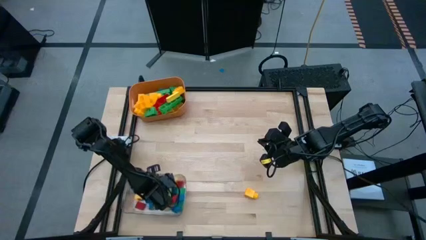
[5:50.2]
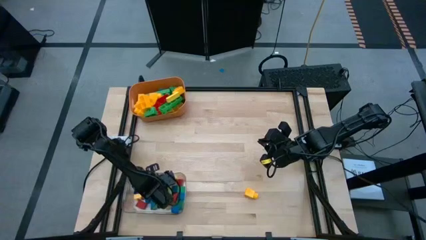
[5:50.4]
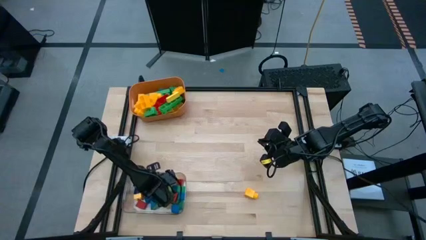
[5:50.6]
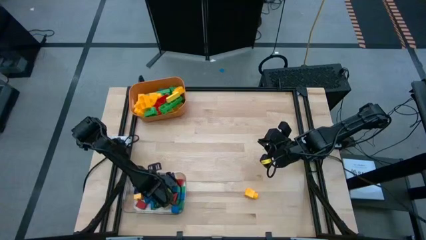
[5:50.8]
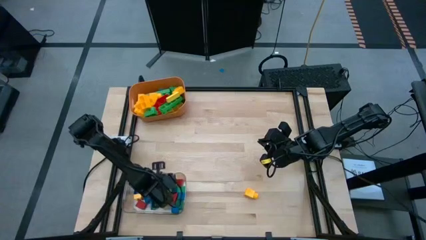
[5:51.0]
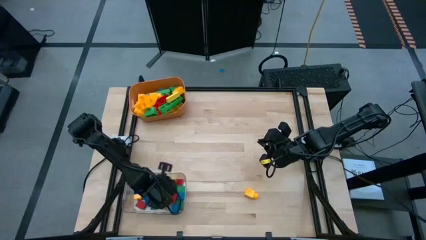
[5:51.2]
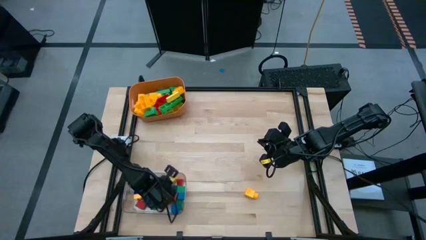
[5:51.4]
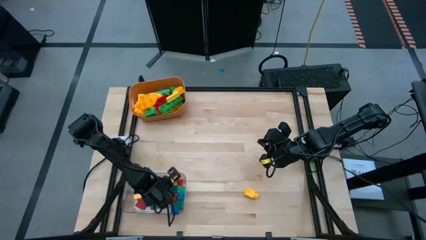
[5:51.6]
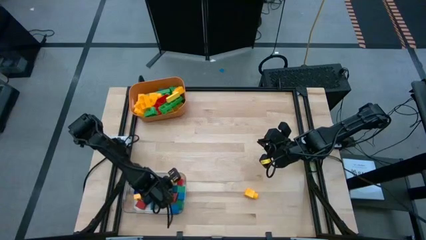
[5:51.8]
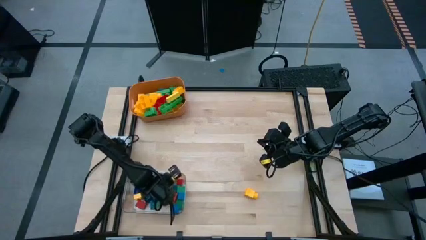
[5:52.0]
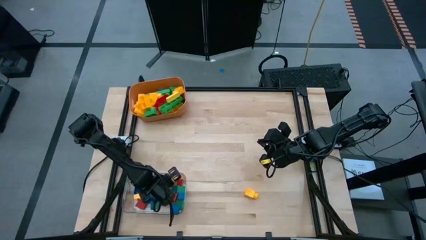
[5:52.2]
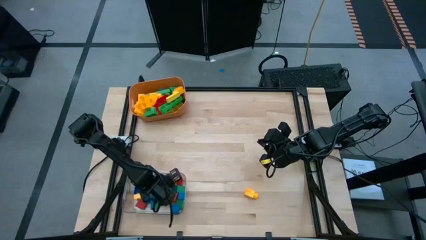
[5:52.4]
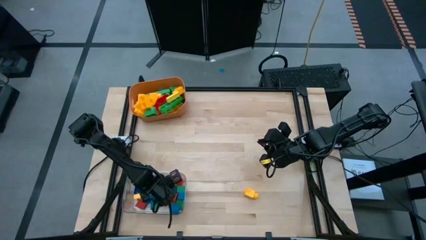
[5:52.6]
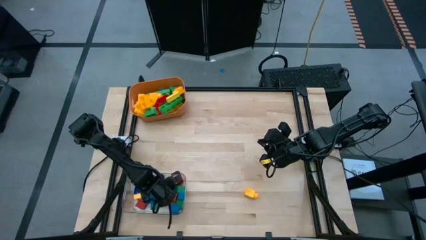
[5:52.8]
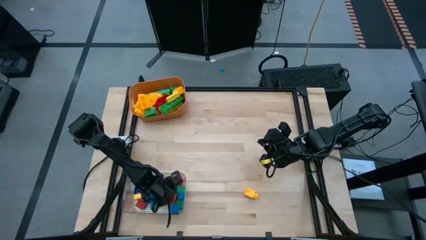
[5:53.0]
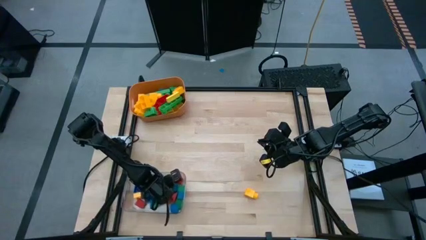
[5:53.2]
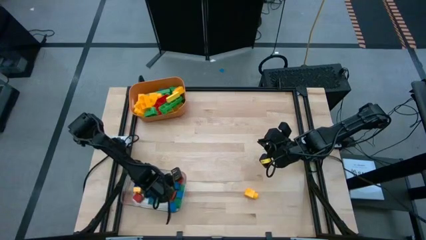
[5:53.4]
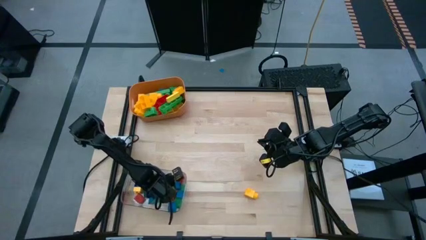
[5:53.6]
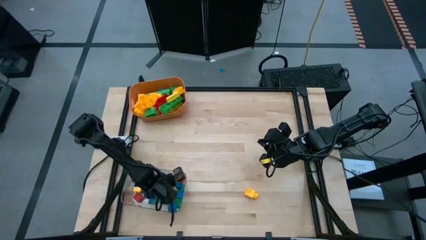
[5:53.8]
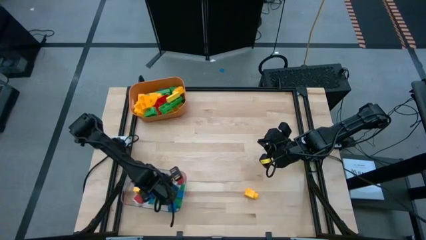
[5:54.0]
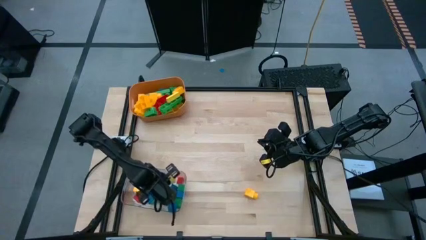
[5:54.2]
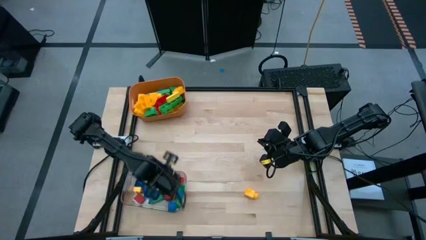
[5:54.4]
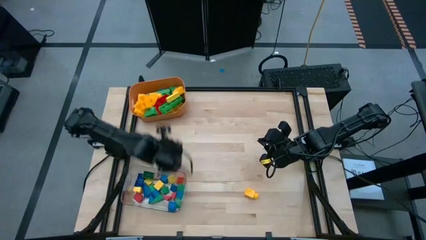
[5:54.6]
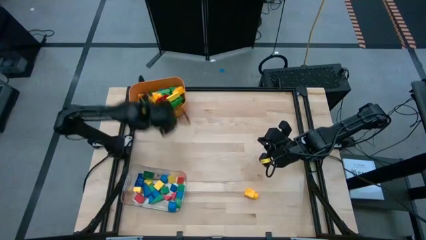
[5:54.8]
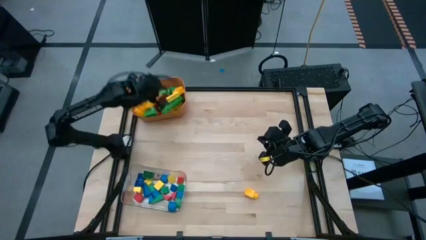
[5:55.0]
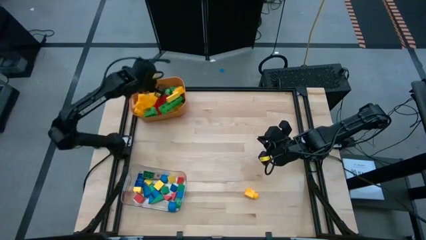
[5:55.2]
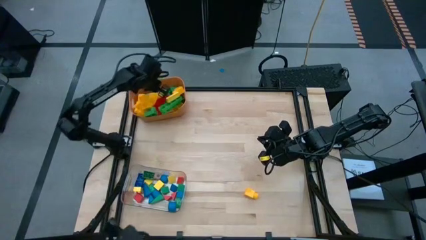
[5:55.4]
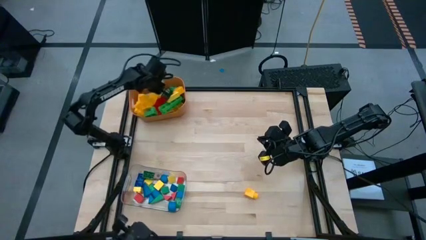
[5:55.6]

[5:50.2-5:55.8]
Task: Sort blocks by size
Put the big light green block into the orange bin

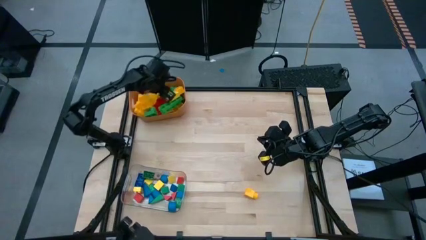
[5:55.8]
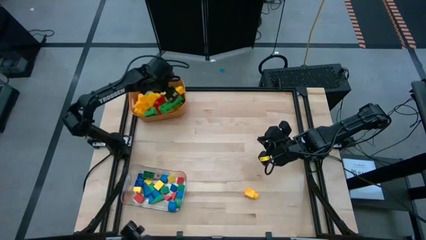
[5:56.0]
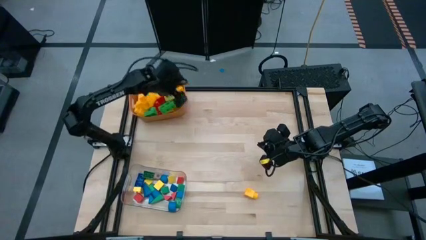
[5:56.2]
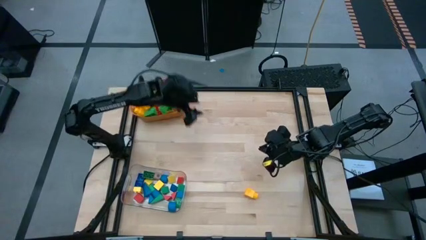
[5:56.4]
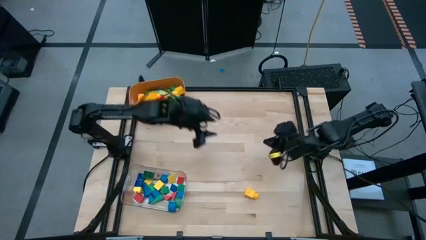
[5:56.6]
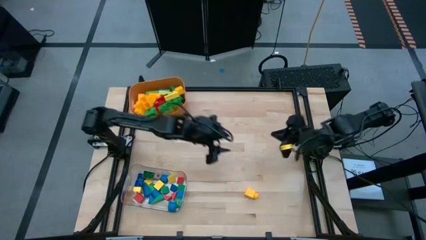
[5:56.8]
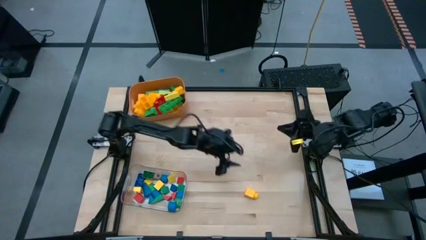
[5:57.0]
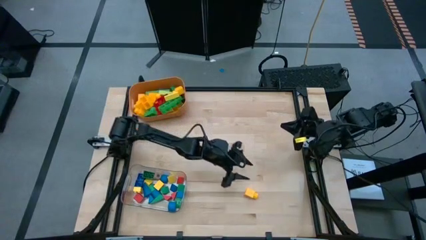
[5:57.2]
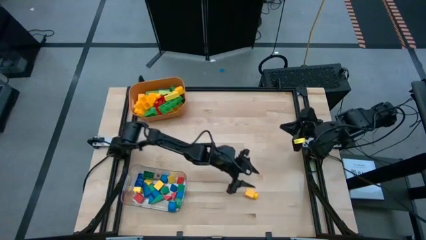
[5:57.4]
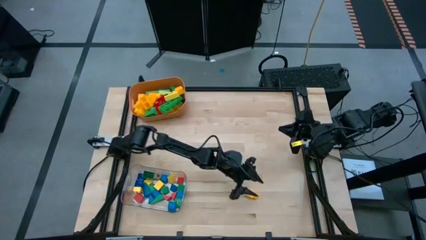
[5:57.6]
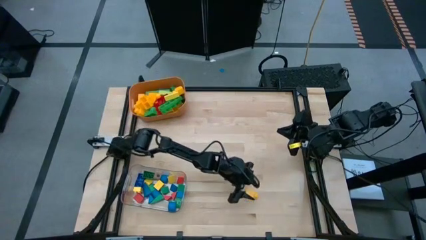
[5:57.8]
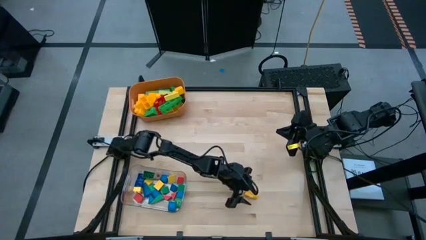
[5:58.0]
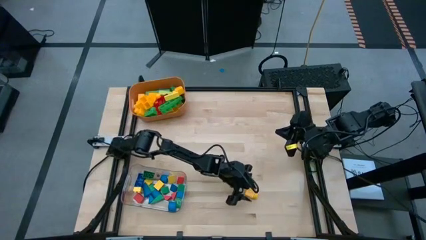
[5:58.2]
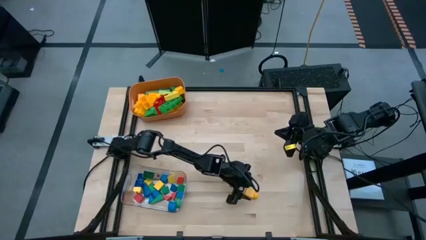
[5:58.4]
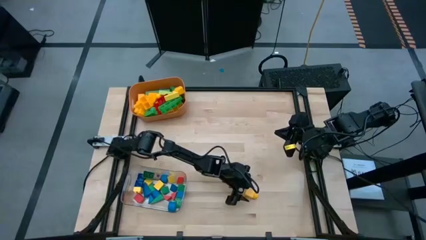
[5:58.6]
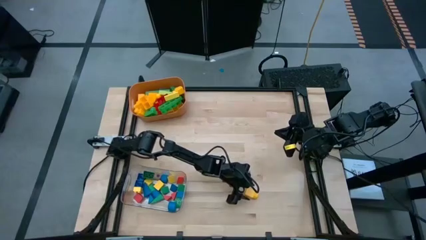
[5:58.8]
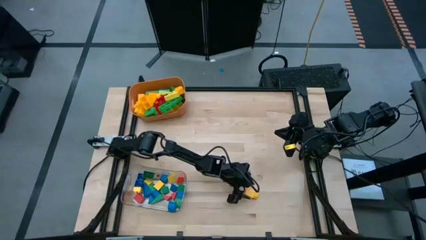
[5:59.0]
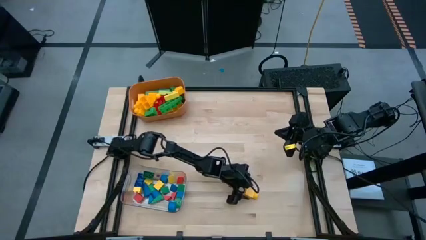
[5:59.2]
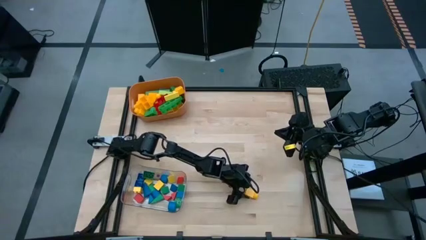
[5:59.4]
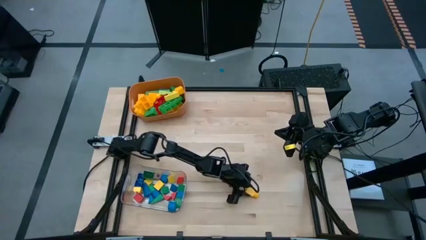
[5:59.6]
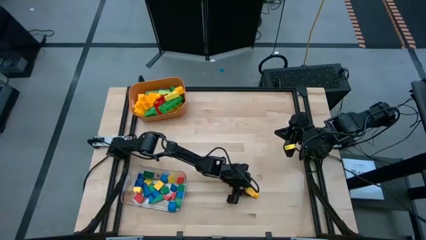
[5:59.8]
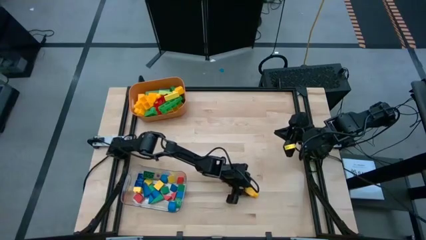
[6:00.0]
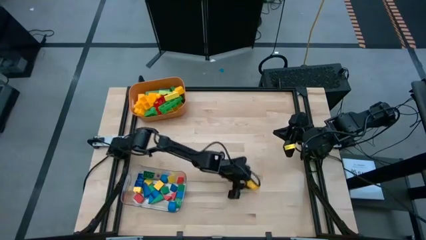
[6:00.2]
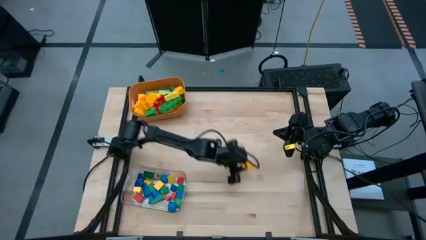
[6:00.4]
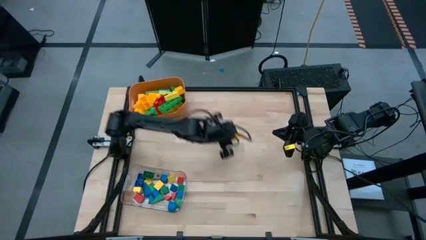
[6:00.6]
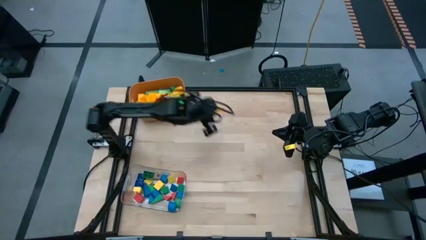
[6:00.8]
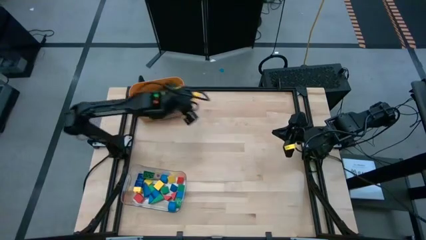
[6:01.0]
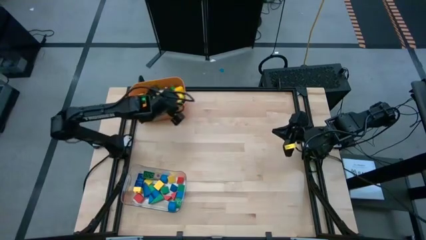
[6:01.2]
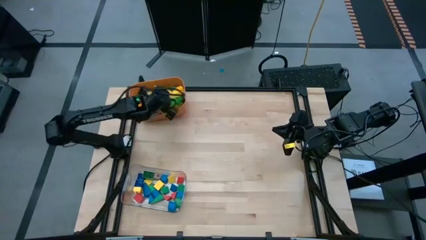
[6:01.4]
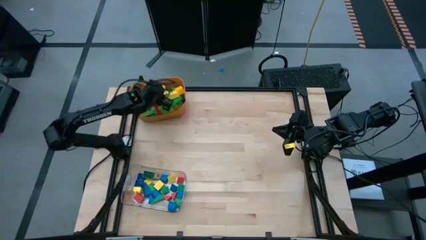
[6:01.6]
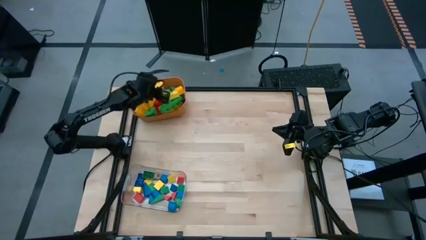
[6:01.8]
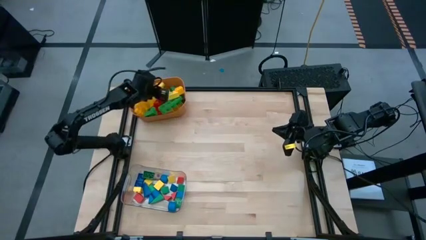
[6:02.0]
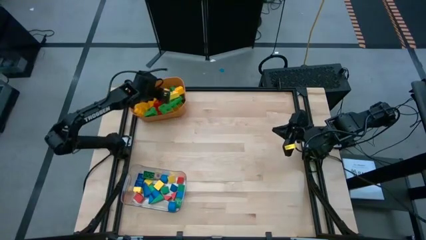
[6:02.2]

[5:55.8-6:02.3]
Put the big yellow game piece into the orange bin

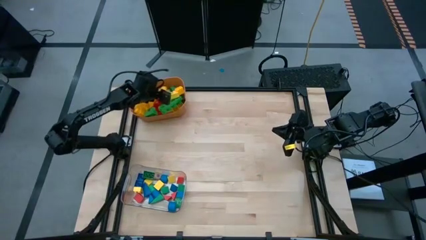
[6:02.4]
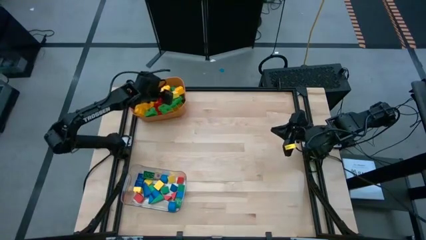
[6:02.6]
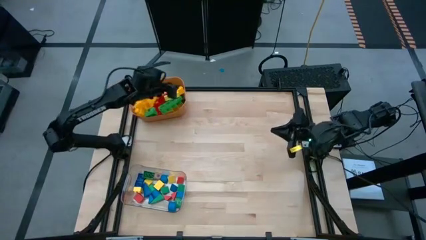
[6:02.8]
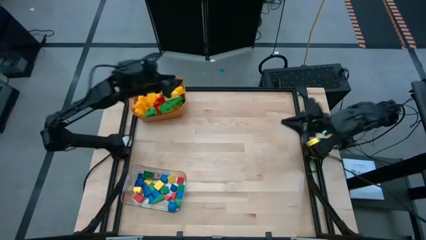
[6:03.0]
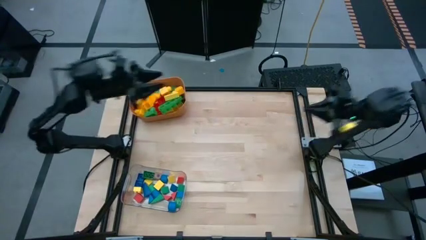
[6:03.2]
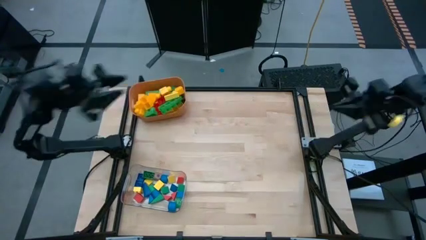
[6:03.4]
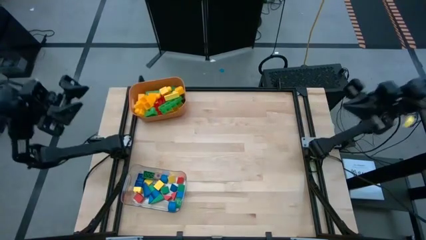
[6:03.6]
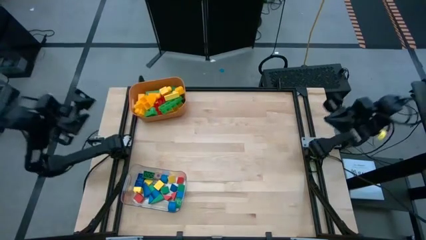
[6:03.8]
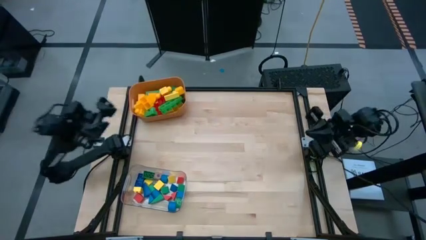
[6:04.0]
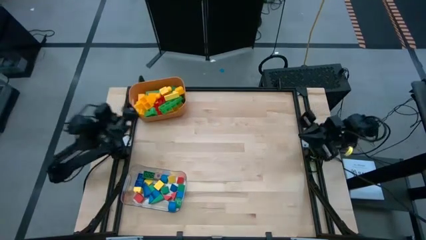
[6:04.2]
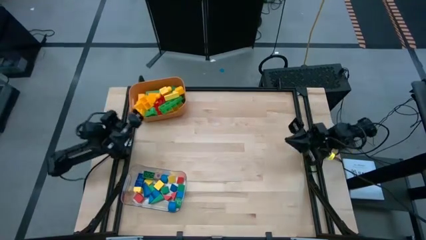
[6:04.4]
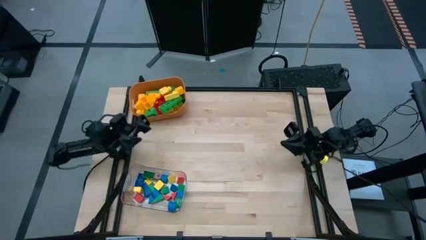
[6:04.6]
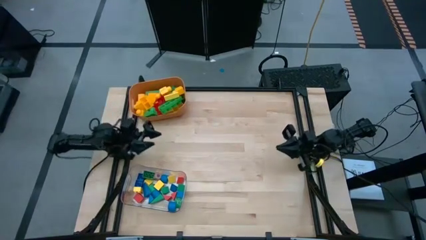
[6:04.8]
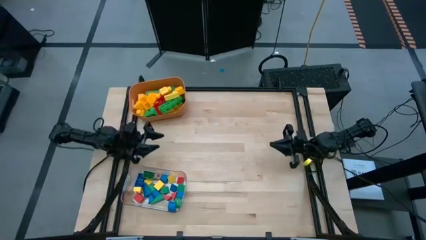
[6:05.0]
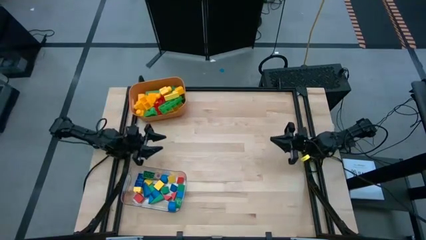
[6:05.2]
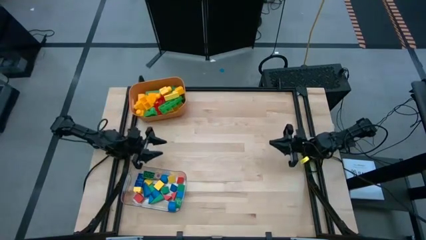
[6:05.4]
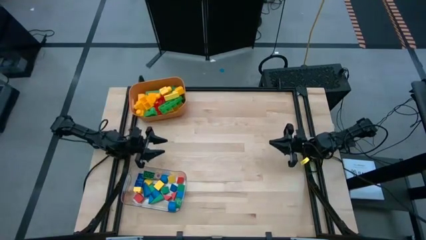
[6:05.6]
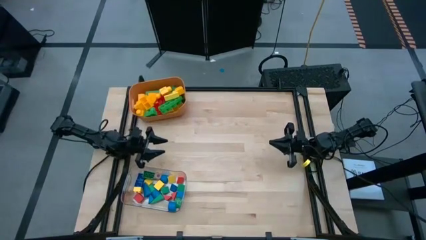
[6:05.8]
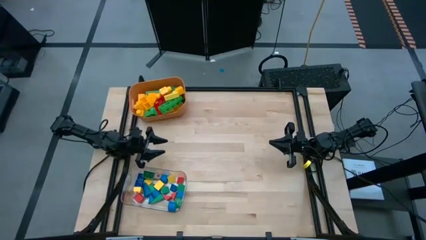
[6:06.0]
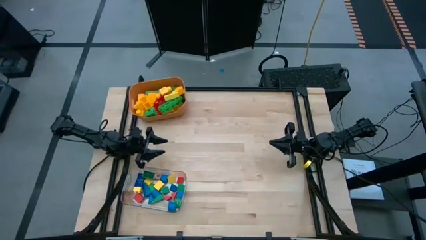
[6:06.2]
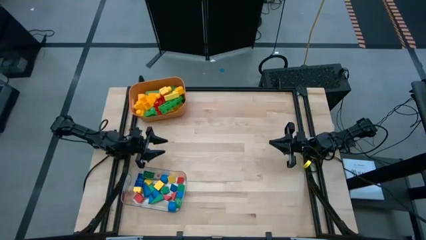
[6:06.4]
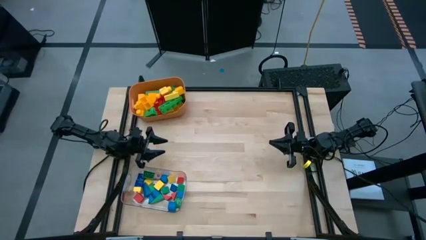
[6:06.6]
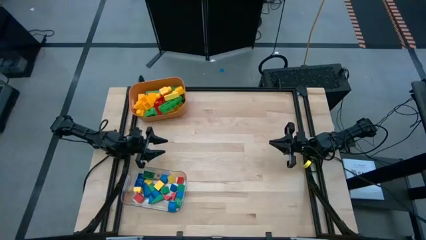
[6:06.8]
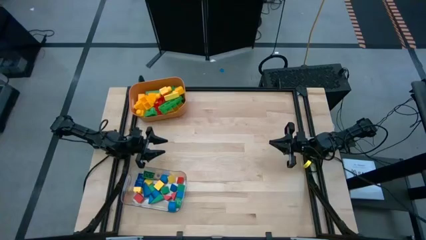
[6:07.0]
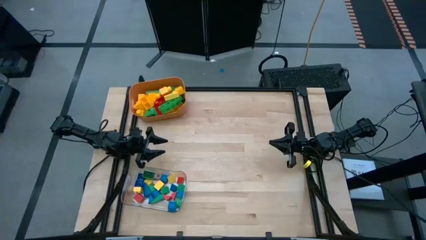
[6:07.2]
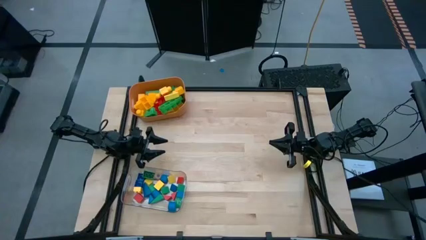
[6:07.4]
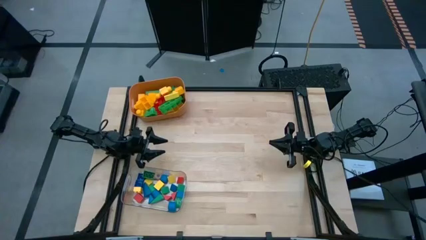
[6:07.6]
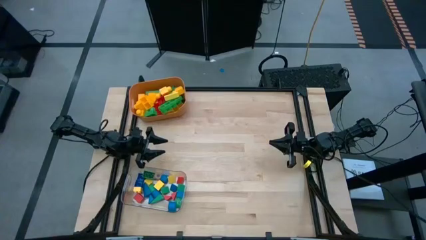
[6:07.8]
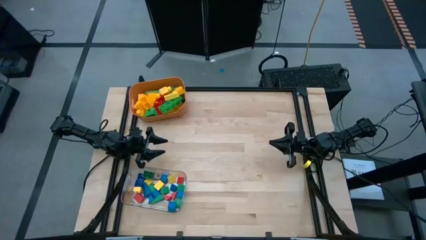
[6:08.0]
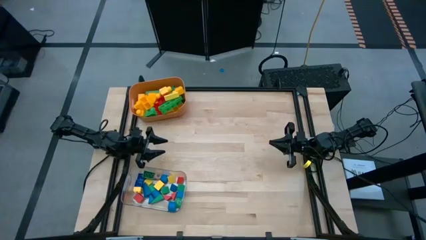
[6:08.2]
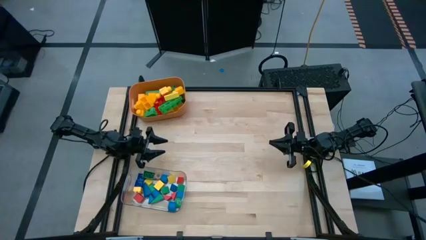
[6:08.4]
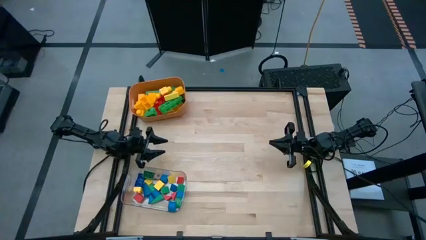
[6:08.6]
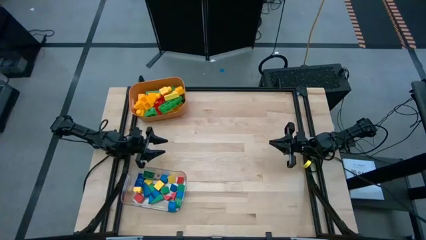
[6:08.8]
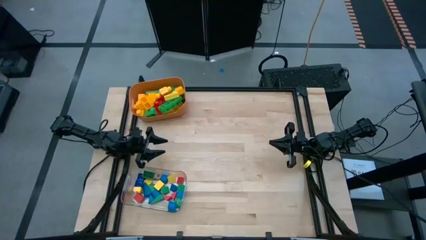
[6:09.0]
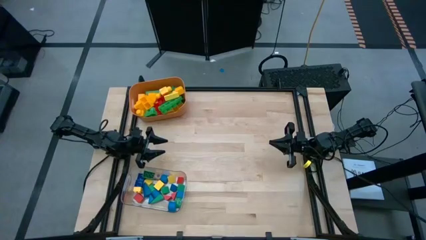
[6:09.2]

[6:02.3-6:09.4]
Return to Home Position
